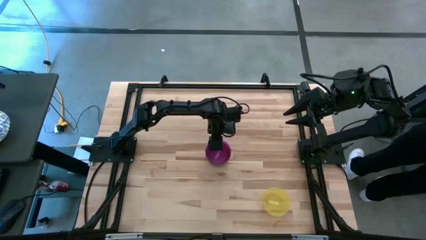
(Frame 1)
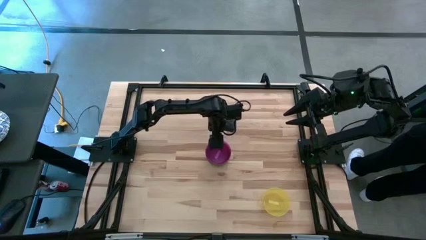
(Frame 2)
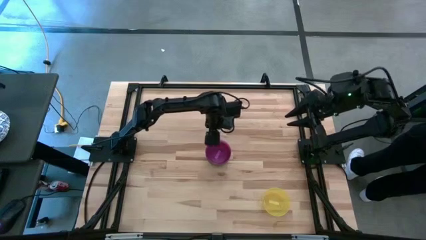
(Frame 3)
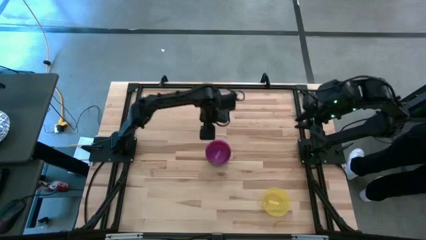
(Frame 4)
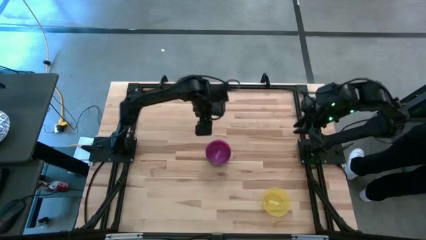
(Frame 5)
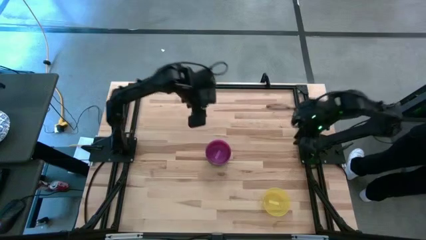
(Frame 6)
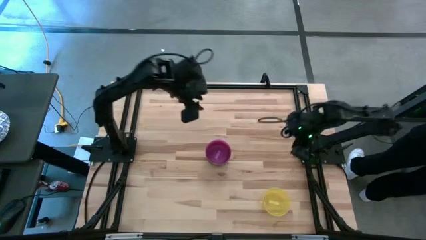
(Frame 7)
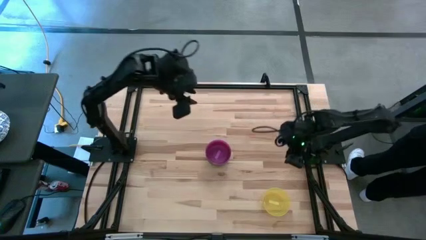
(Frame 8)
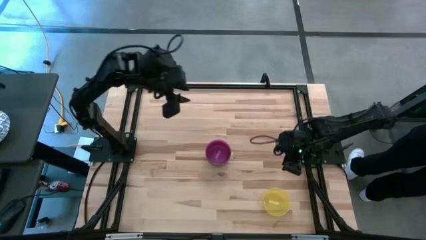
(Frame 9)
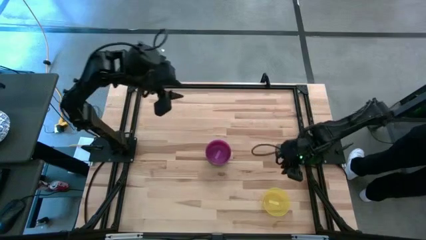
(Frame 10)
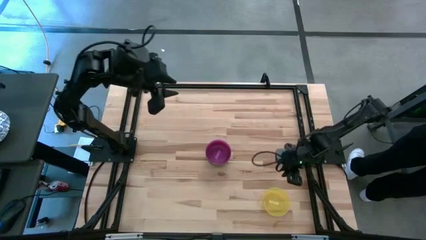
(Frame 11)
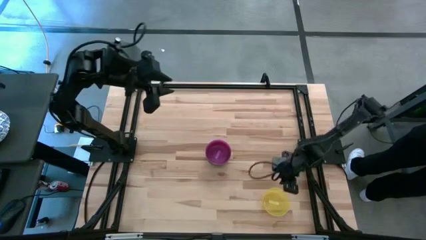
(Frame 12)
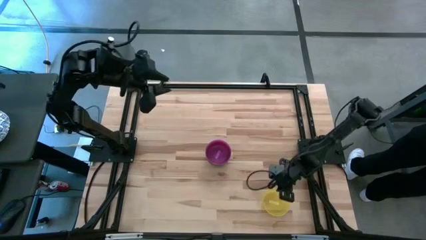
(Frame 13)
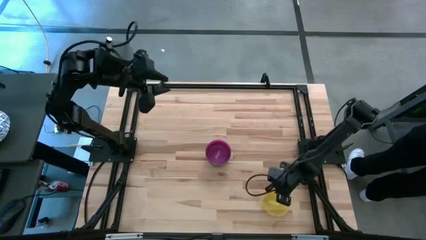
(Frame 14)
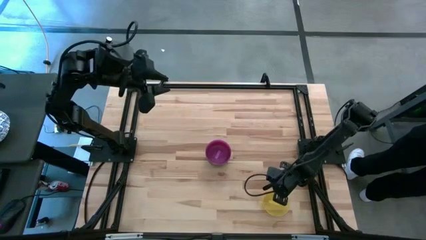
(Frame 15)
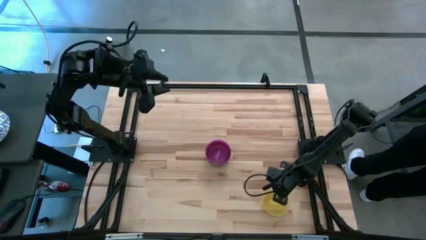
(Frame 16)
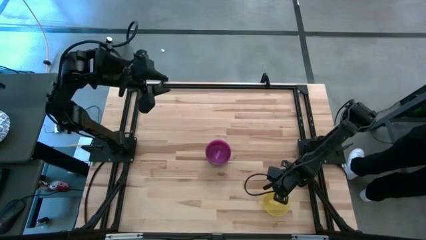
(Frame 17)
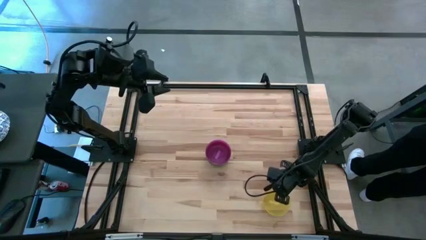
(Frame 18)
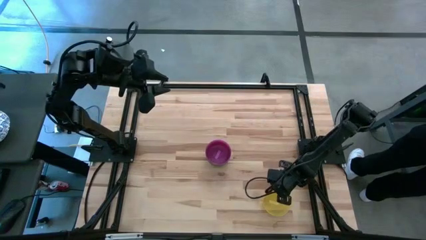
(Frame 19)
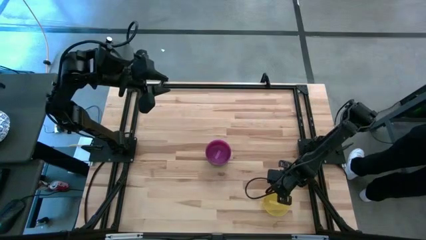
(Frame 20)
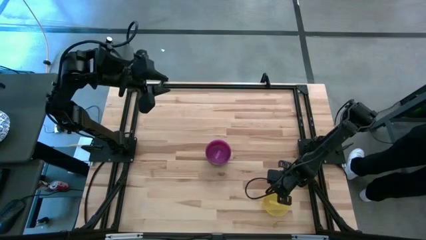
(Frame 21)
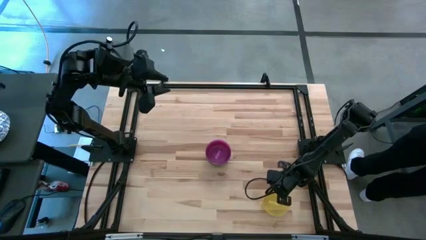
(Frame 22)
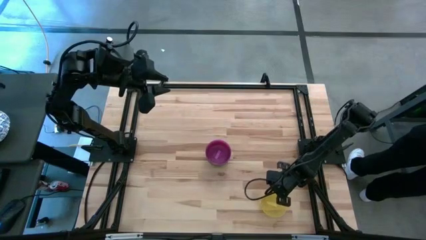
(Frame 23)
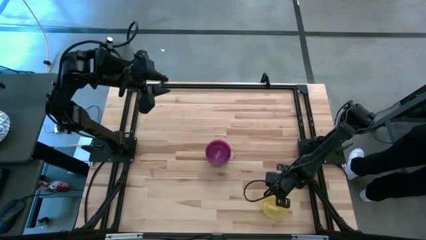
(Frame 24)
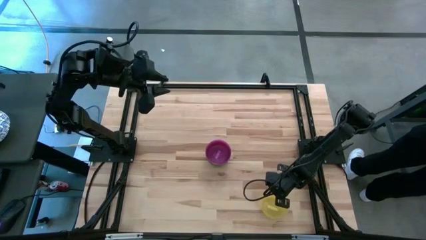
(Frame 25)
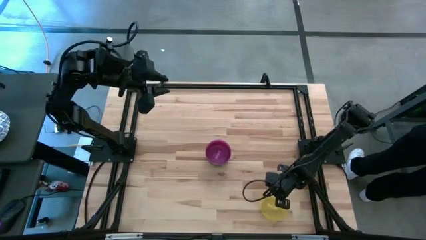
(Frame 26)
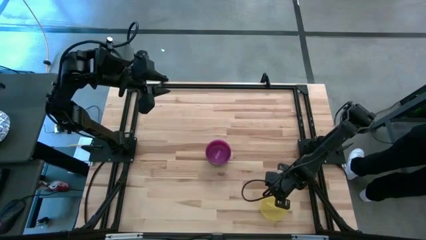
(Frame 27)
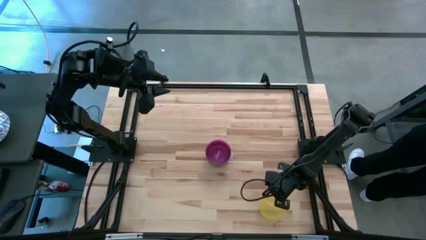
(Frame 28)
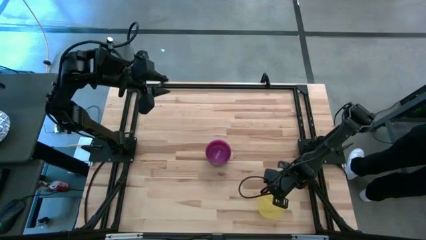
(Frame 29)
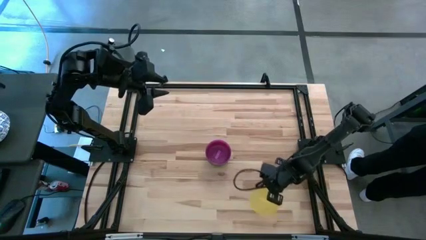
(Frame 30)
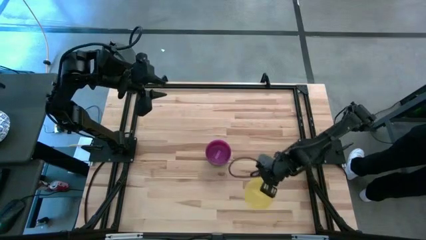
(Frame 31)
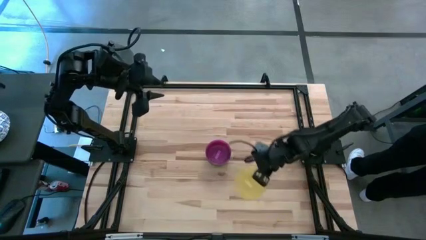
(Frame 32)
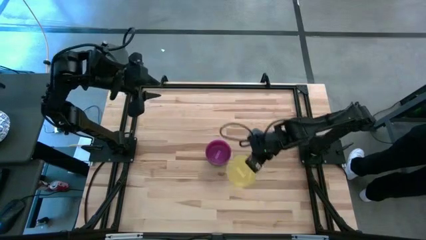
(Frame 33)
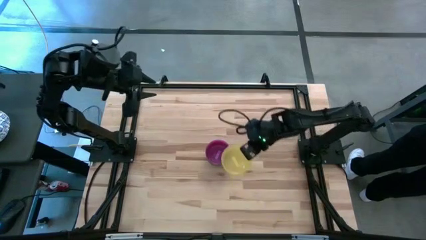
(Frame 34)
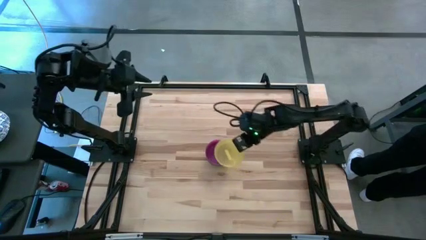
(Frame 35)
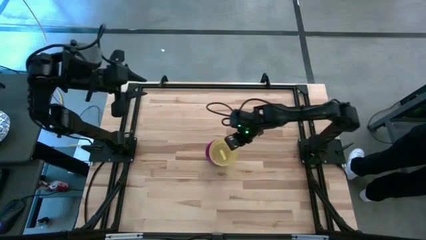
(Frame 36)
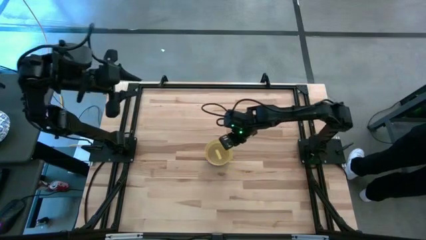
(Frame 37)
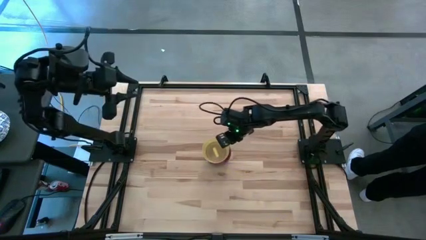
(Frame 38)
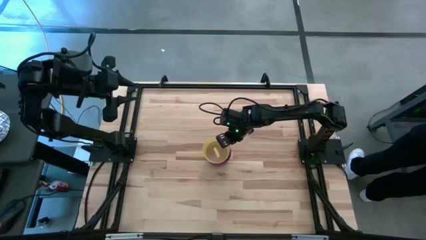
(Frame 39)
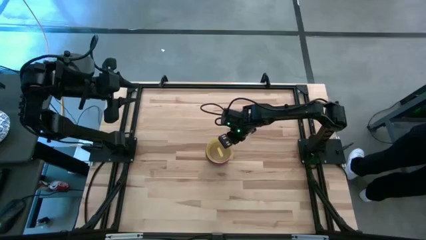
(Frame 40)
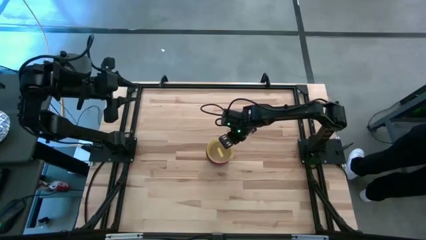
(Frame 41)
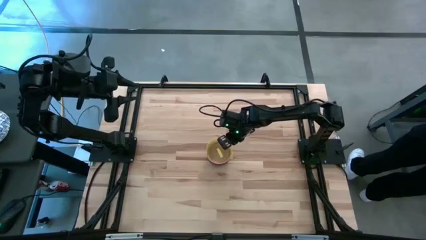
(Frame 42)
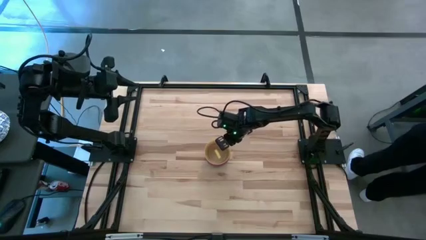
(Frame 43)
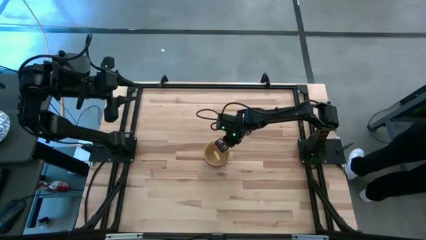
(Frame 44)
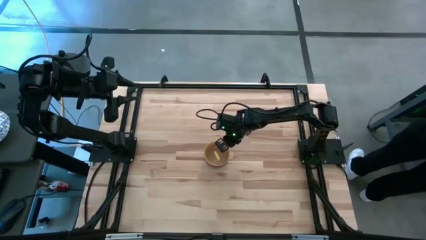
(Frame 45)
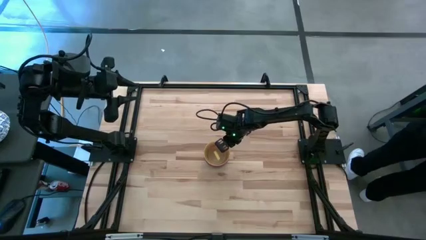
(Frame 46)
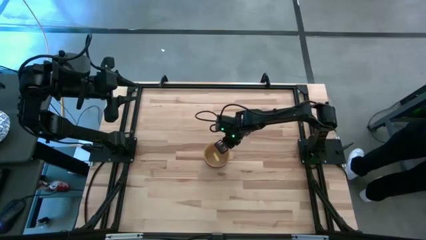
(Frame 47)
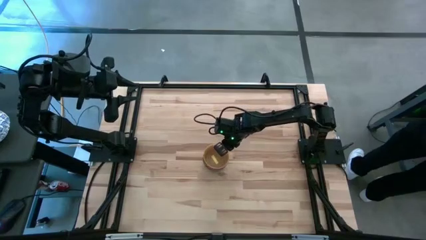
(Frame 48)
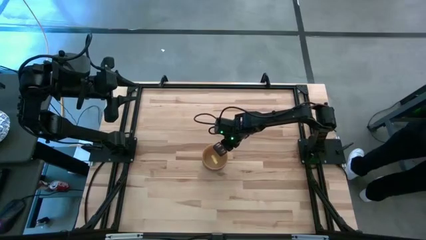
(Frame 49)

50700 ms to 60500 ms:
Task: Nest bowls inside each other
Stack the yellow bowl on the purple bowl

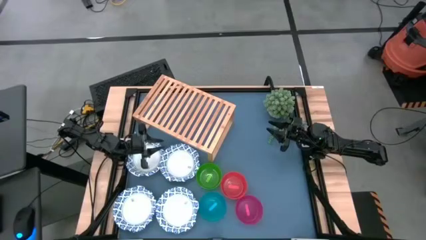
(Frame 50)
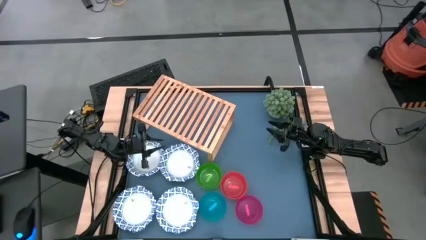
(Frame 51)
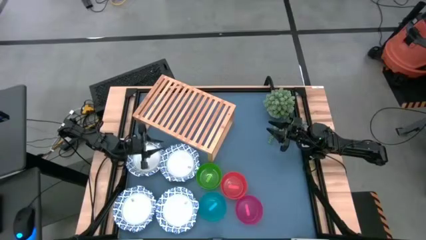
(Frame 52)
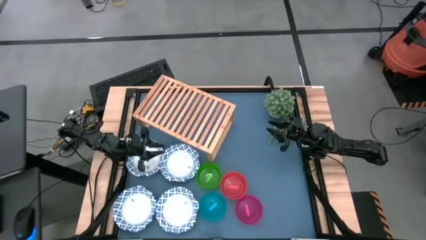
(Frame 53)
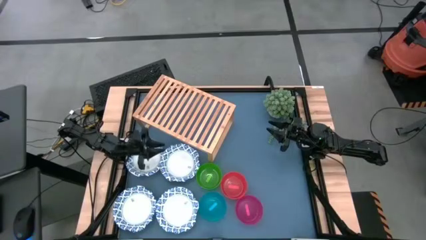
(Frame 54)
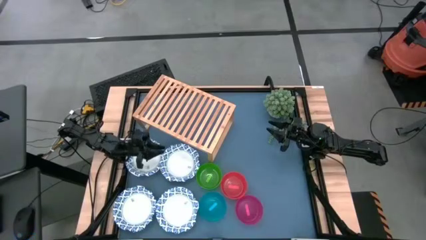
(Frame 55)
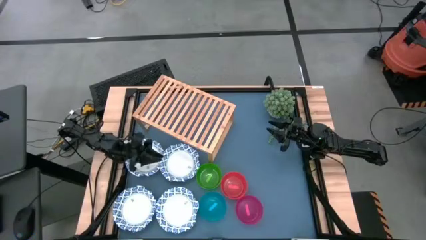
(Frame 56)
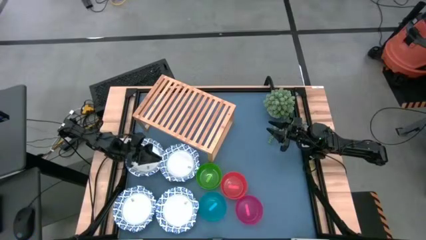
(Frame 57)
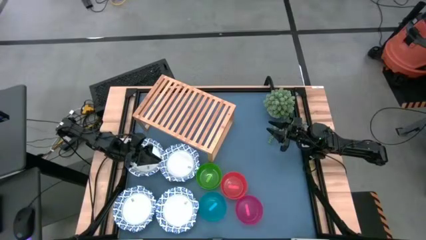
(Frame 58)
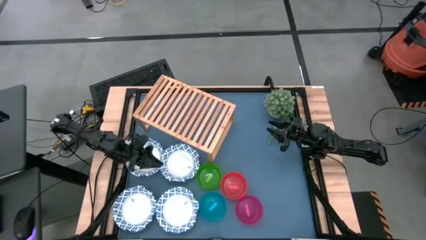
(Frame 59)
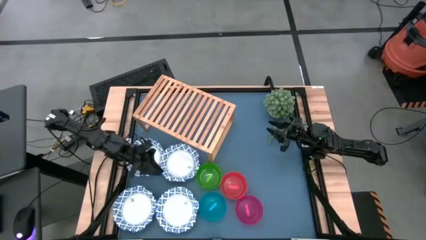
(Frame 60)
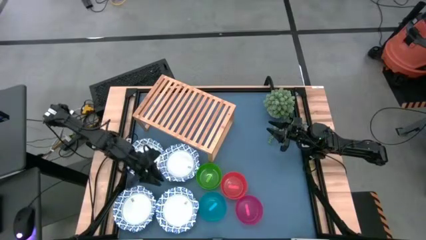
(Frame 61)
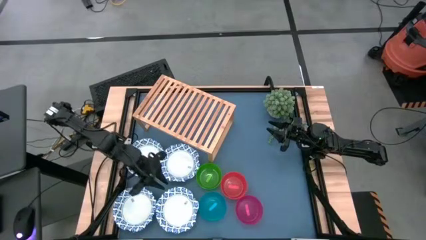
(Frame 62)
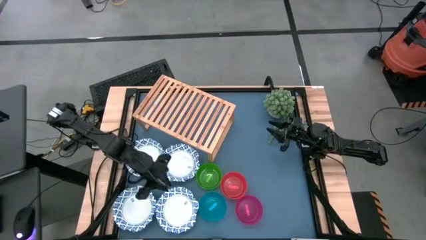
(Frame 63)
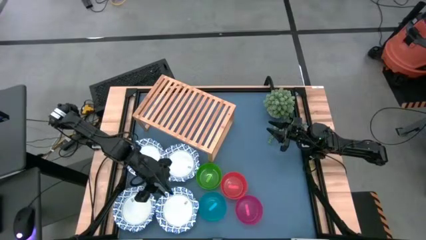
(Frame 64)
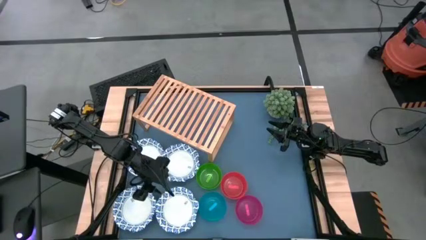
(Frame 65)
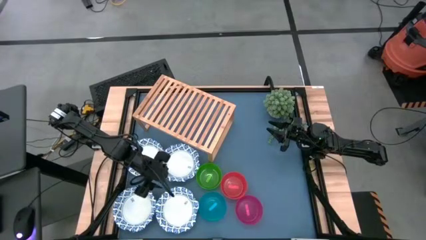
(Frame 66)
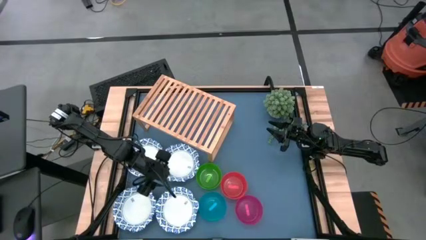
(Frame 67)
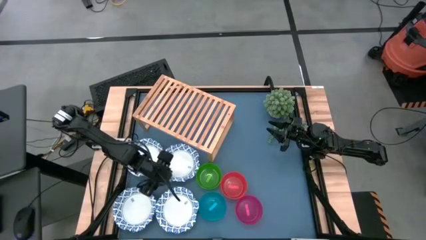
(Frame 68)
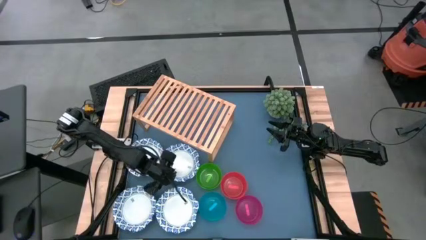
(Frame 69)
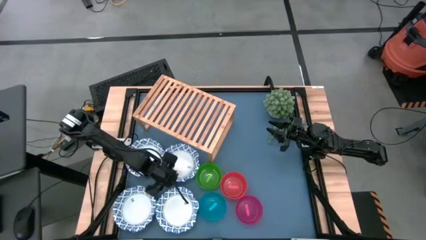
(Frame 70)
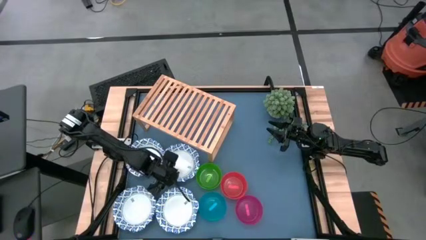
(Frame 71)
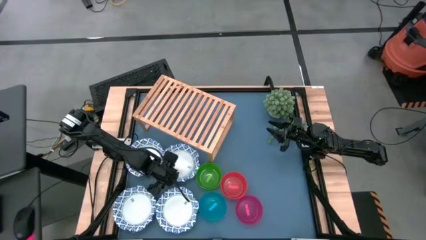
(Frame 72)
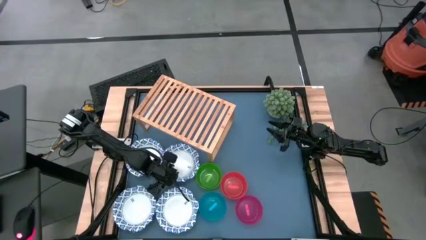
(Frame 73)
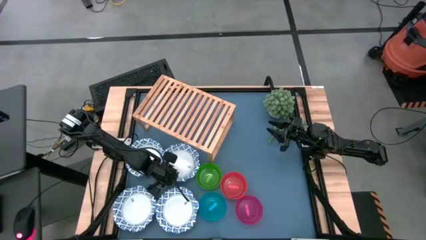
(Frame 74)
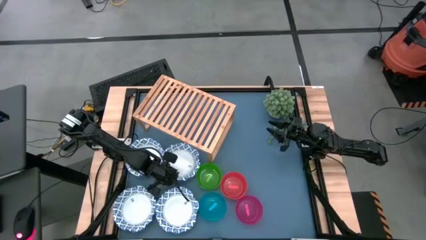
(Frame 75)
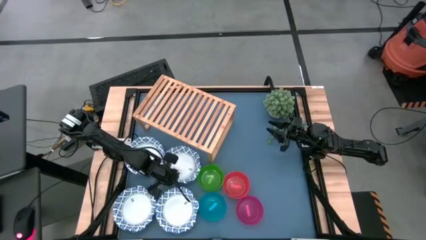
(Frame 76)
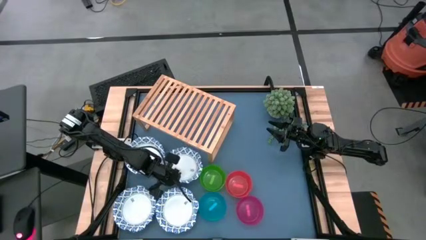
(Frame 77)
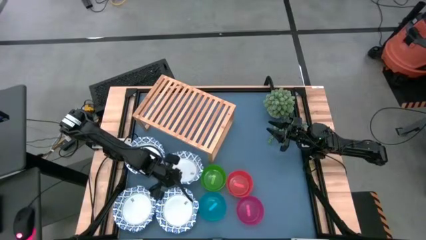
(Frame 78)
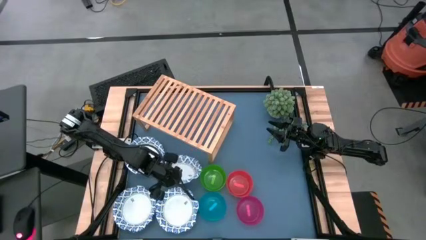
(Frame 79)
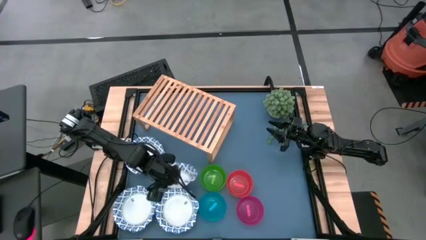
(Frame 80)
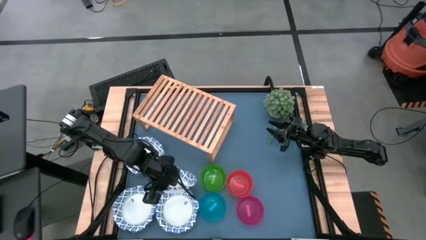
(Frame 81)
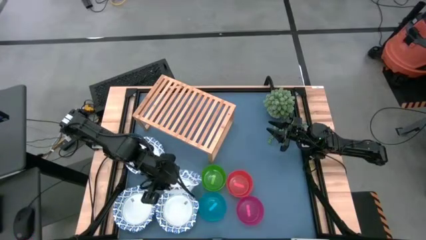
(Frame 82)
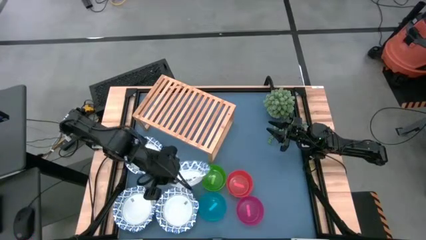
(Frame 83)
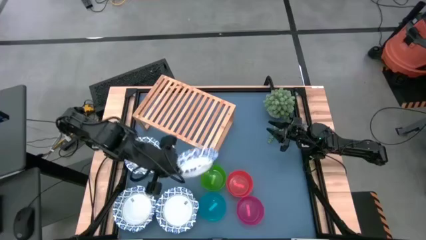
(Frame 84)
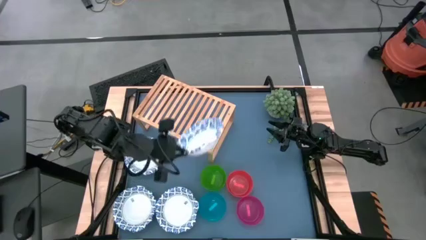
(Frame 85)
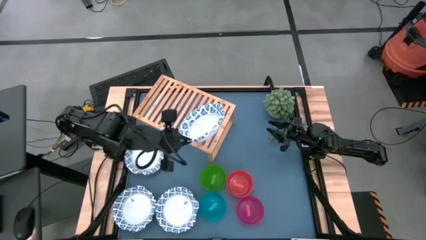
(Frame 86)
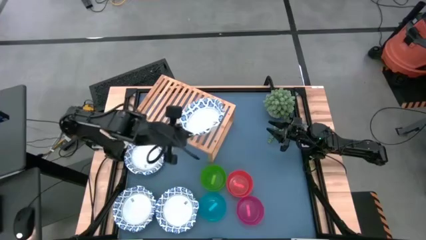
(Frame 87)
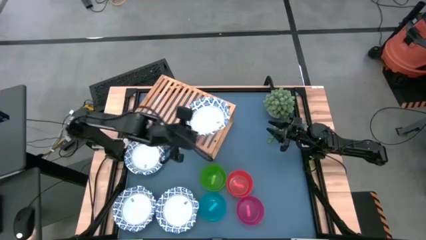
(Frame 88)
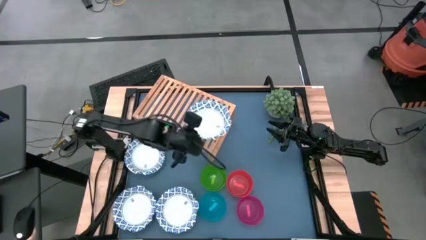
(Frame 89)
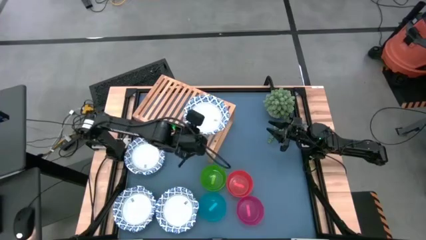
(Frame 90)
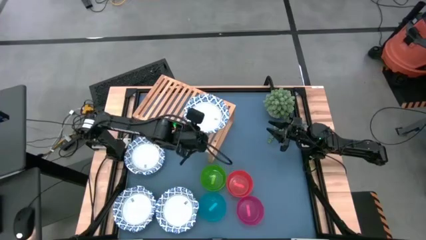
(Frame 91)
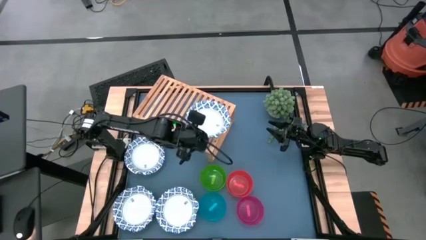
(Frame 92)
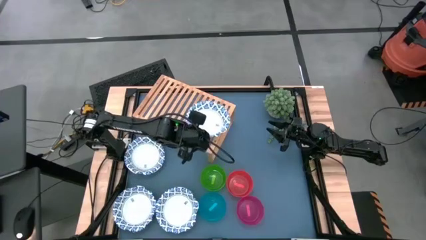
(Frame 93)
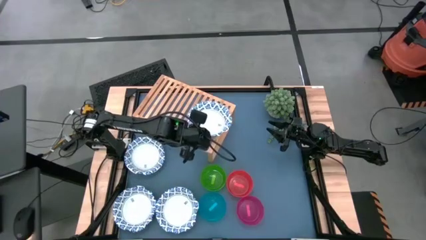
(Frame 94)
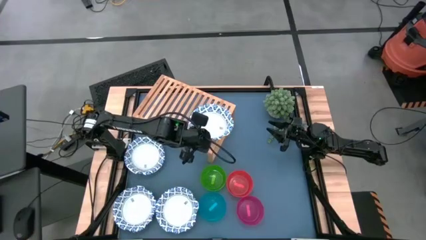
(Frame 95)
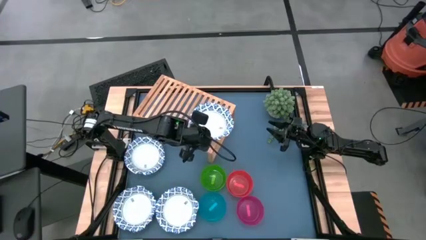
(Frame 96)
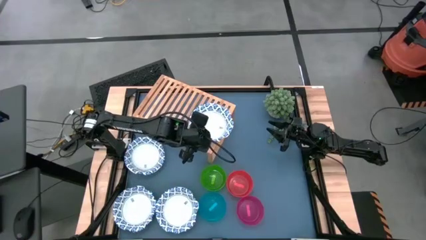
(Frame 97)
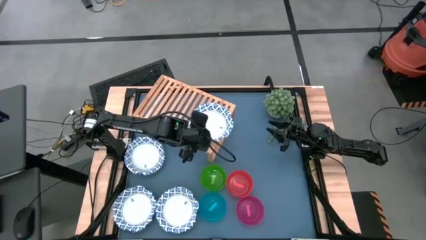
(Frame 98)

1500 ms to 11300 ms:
Task: Place and stack bowls onto a shelf
Put the blue and white bowl on the shelf
